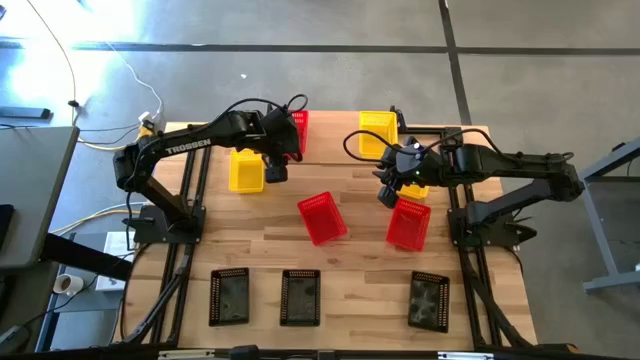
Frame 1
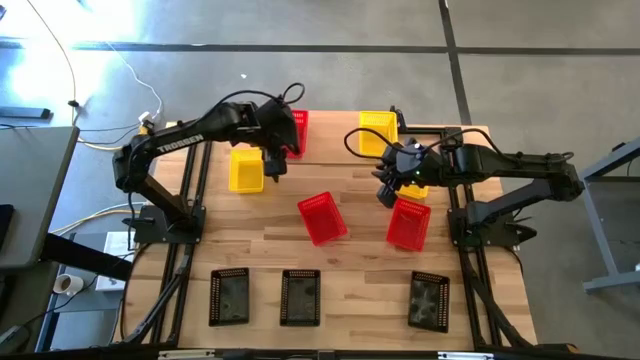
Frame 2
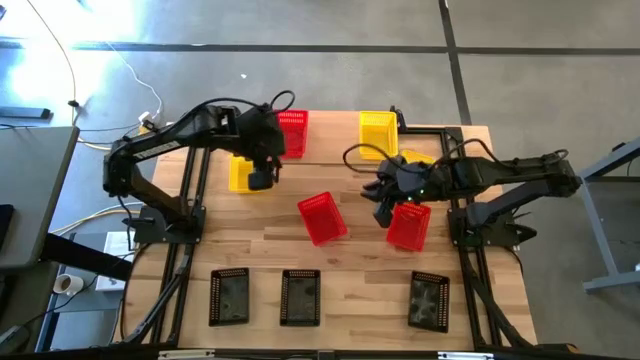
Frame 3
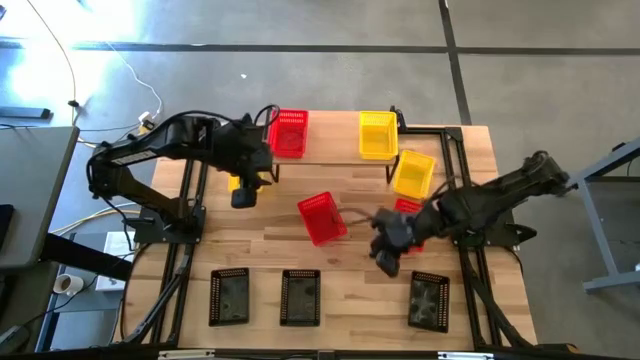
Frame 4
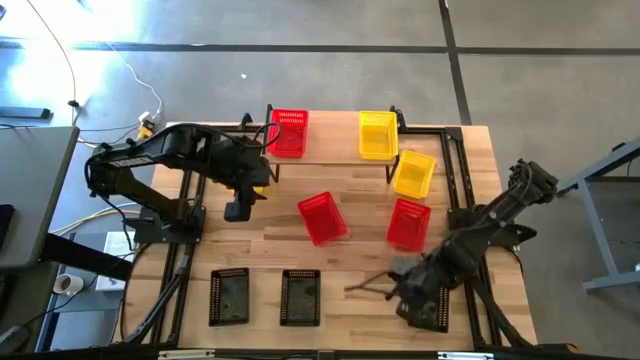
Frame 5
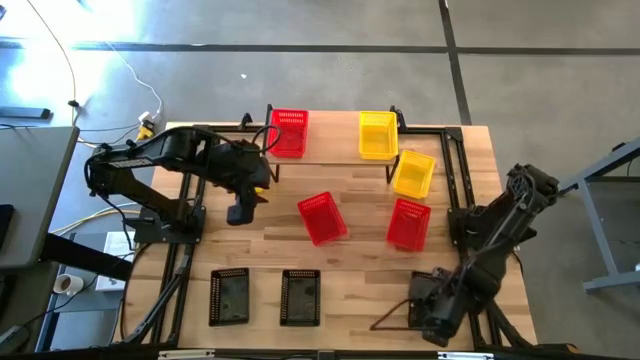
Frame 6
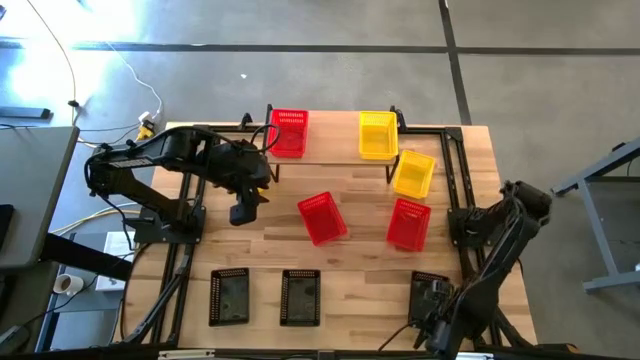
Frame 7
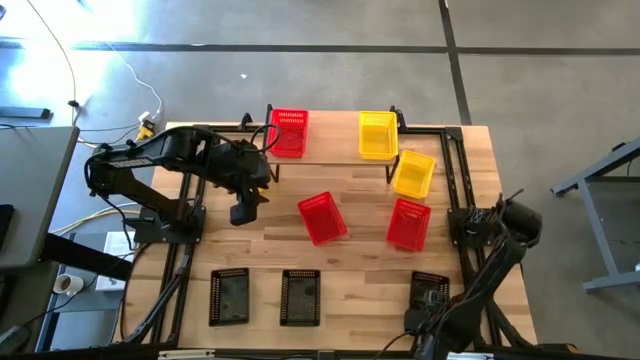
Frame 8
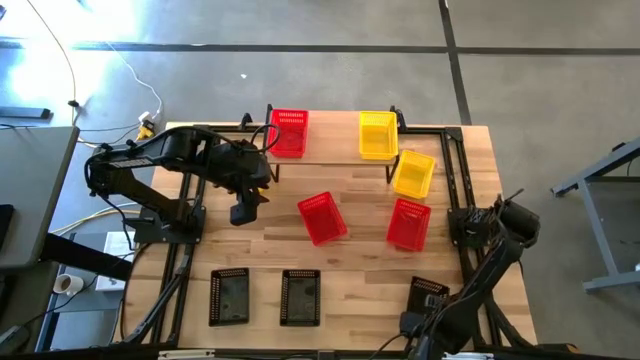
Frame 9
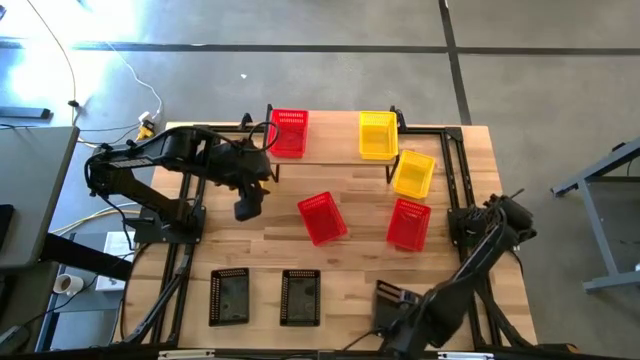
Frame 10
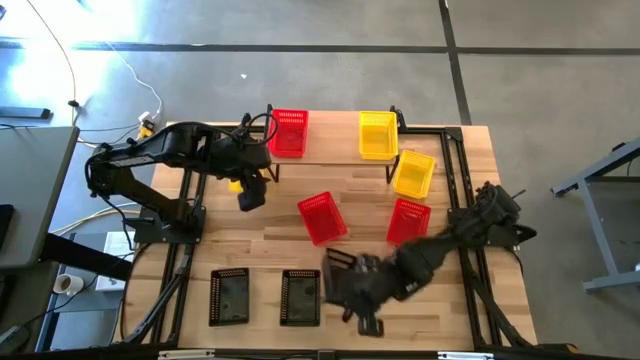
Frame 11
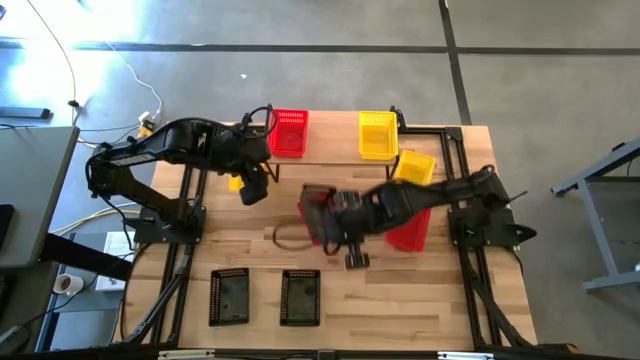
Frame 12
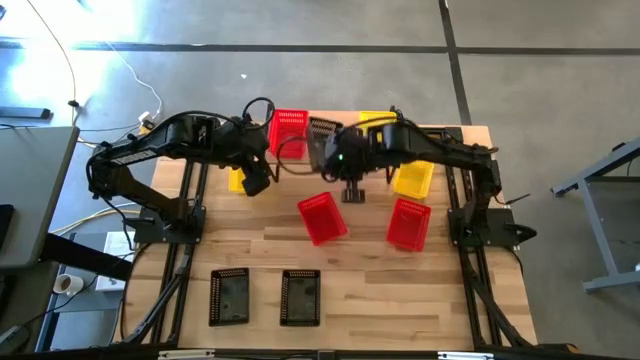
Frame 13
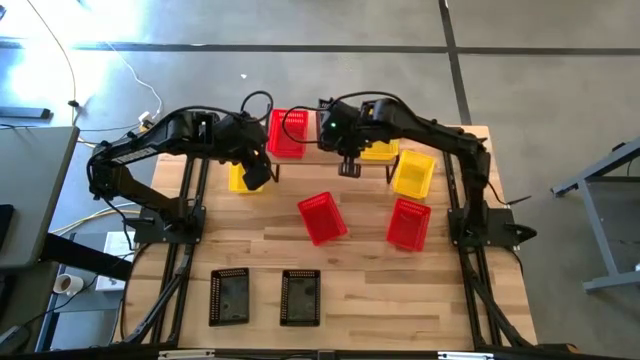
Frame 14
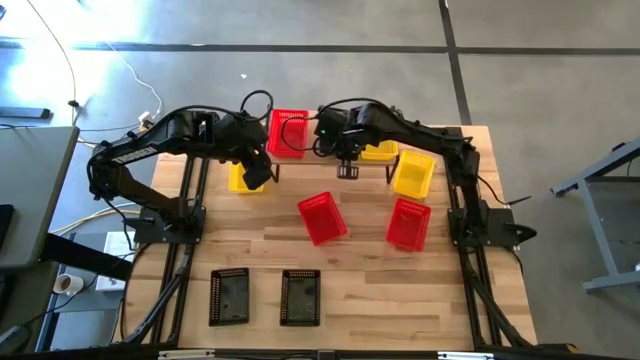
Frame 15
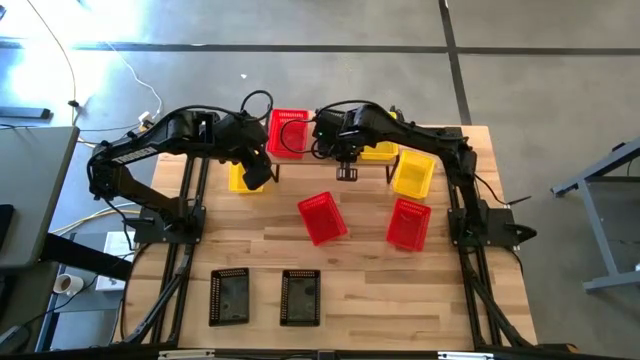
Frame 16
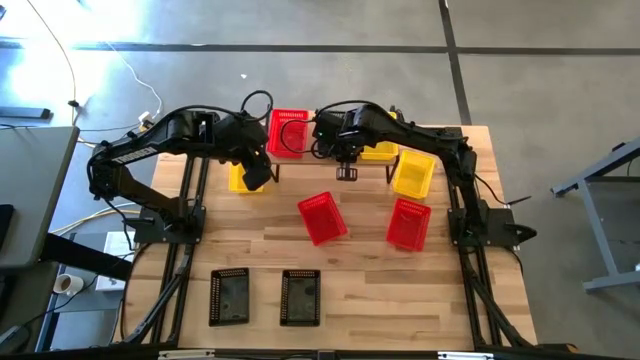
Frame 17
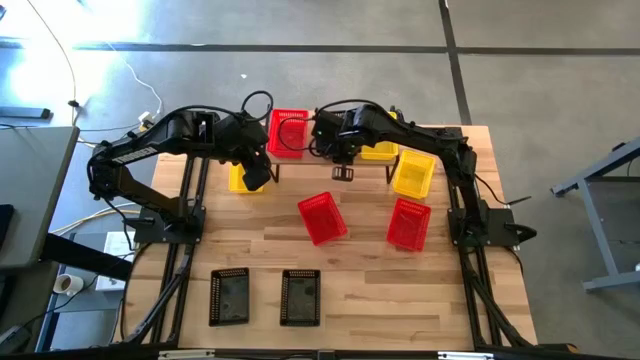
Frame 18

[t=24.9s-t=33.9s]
Task: Stack baskets on shelf by color
Put the right black bin on the shelf

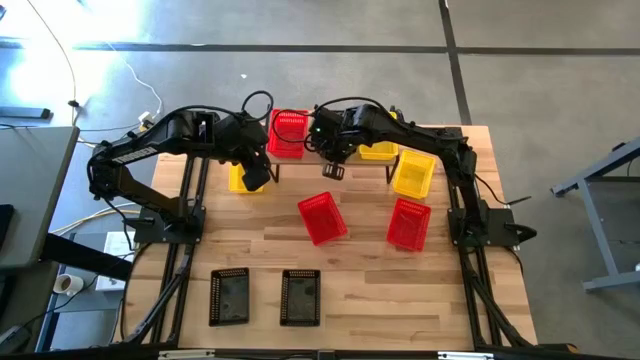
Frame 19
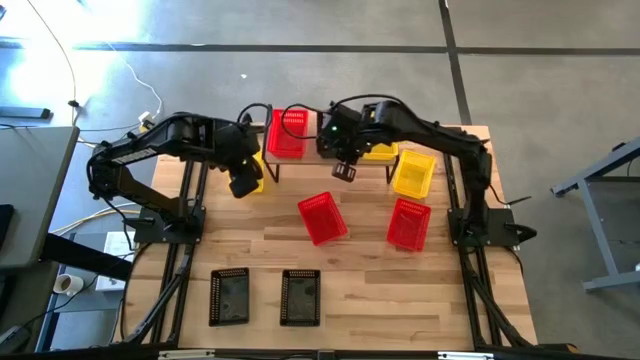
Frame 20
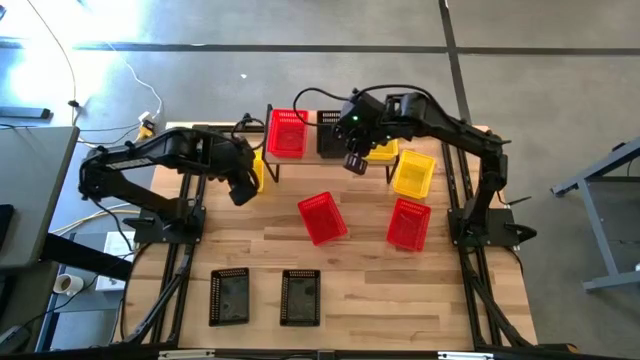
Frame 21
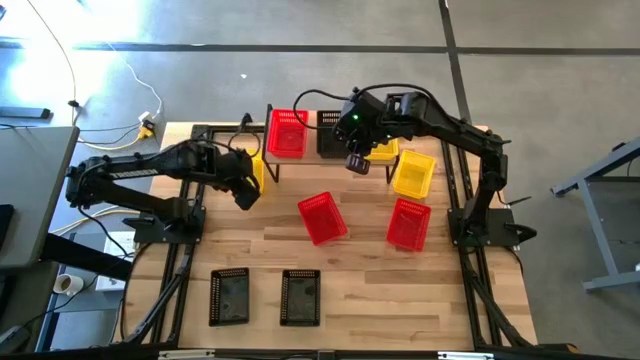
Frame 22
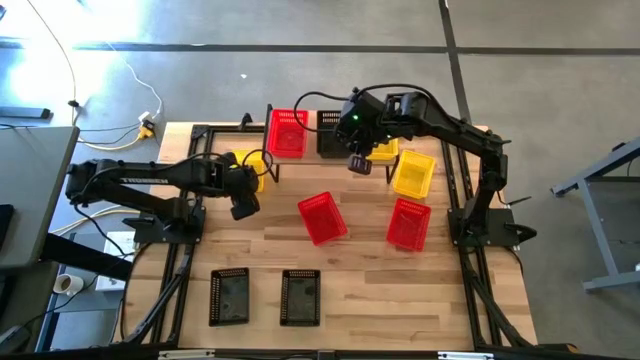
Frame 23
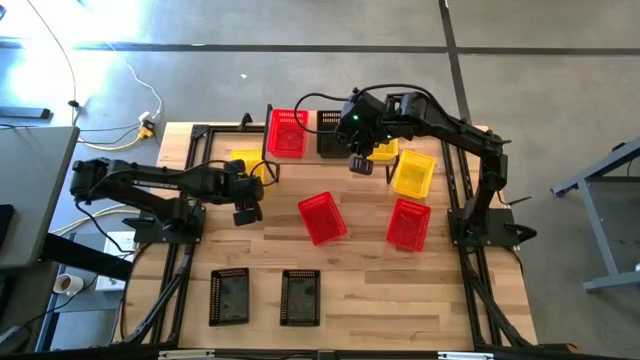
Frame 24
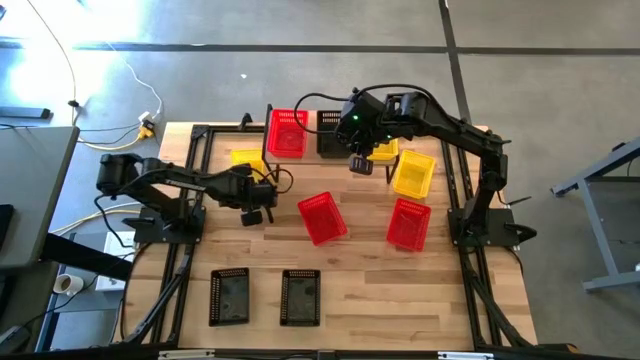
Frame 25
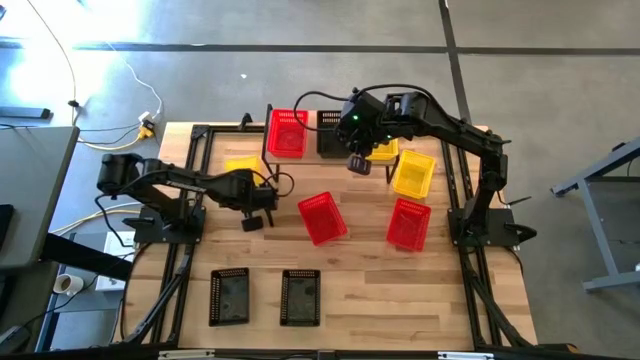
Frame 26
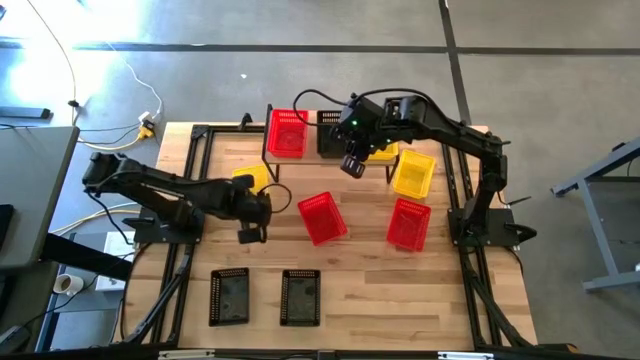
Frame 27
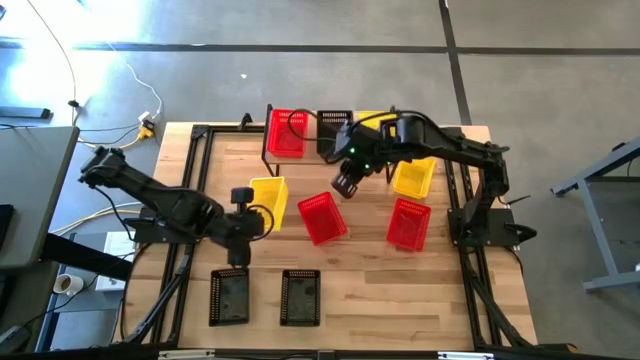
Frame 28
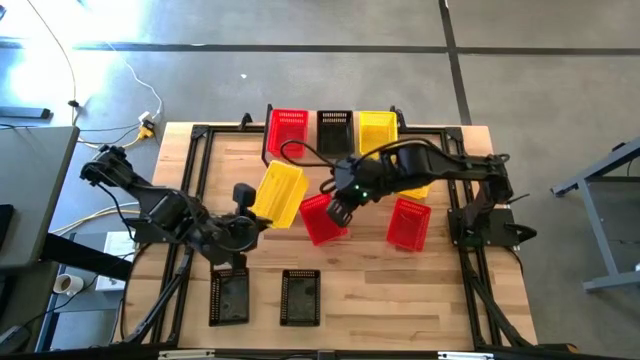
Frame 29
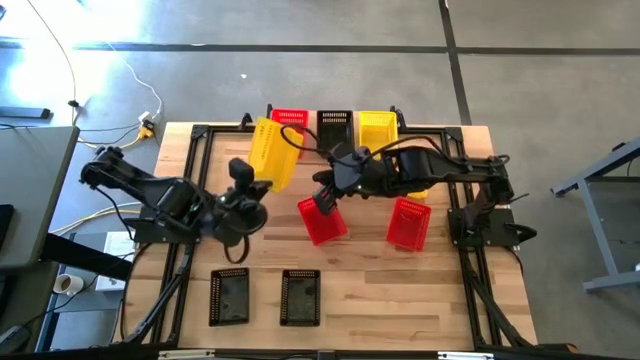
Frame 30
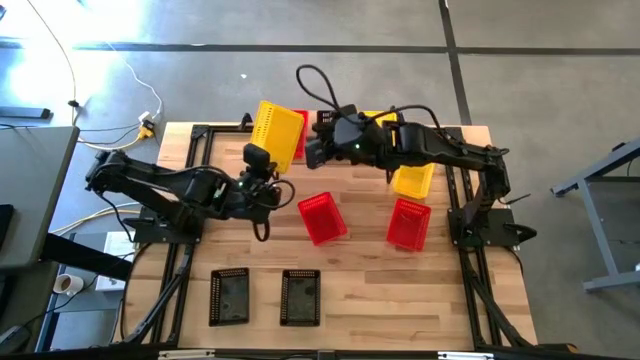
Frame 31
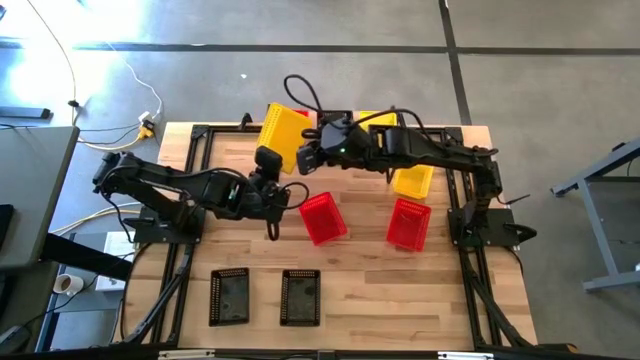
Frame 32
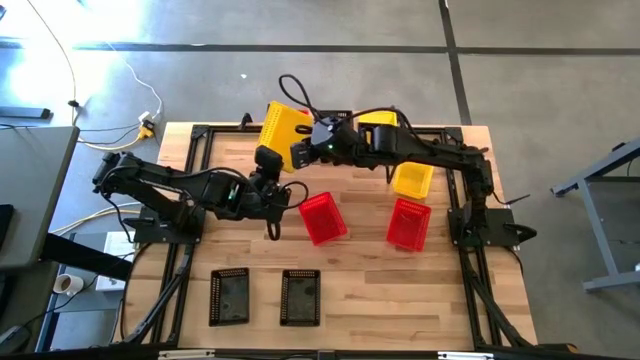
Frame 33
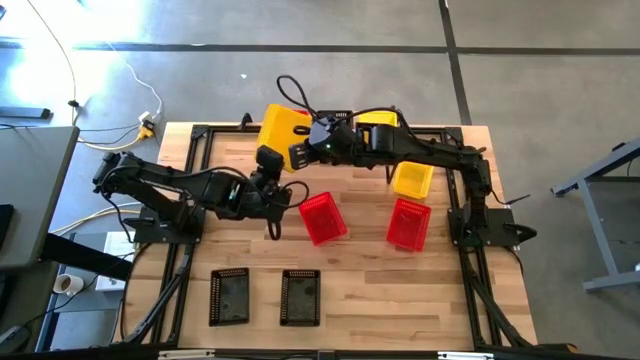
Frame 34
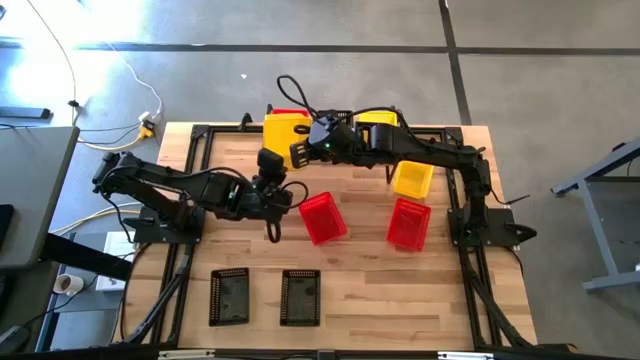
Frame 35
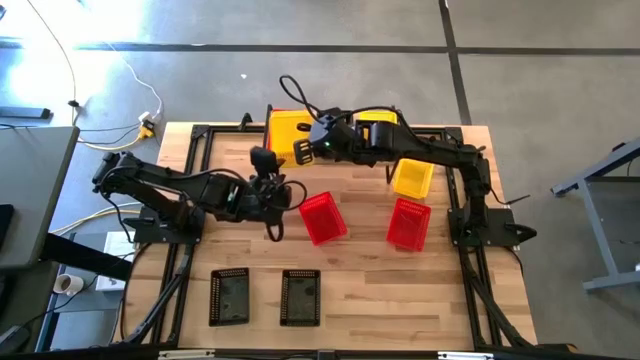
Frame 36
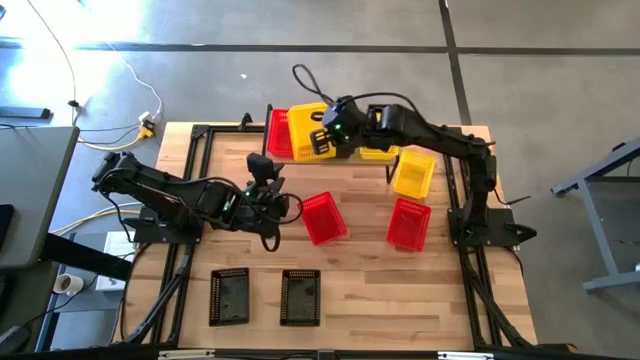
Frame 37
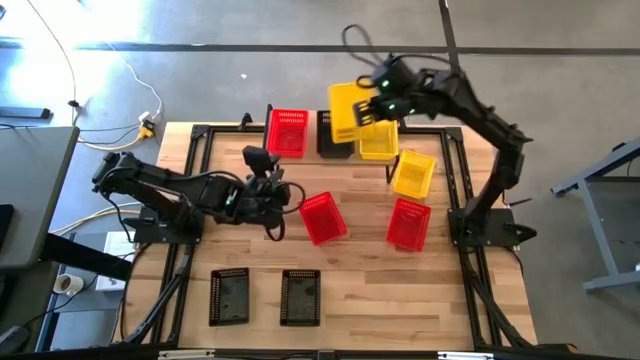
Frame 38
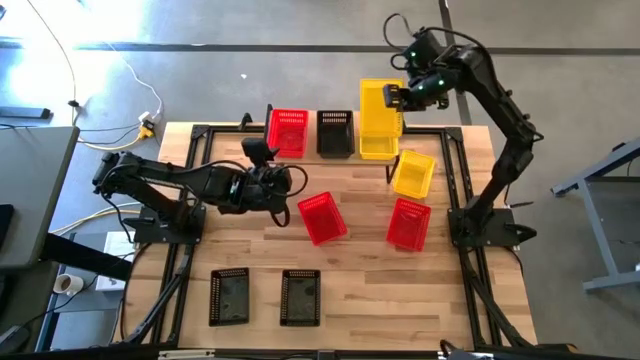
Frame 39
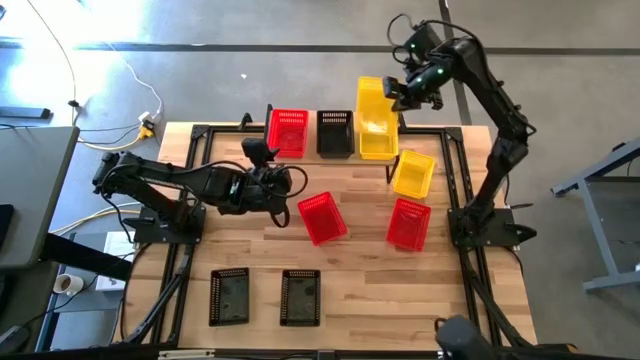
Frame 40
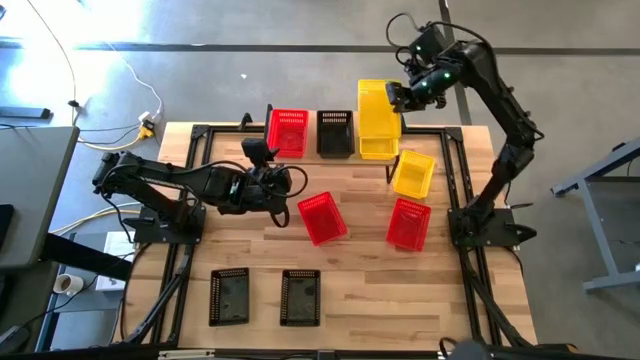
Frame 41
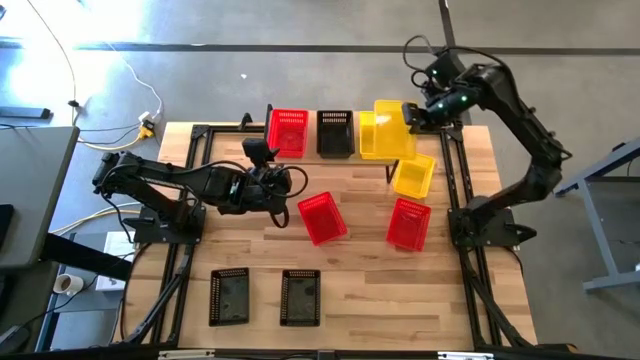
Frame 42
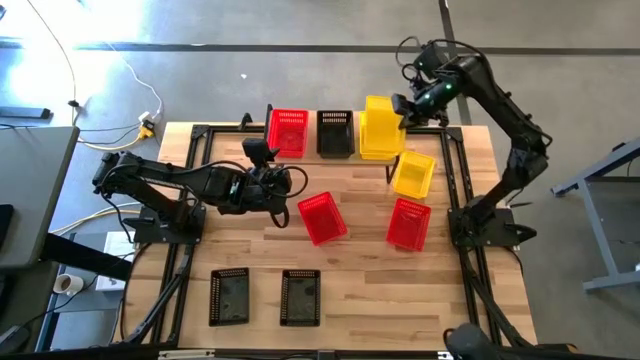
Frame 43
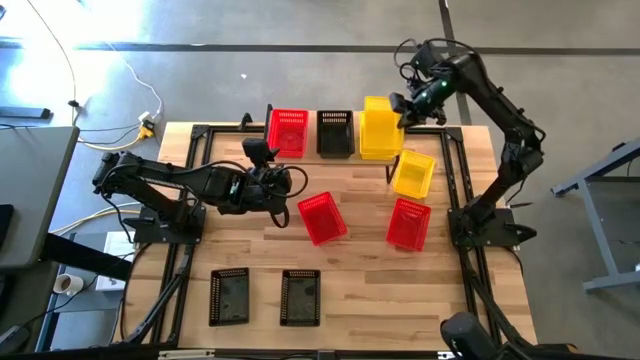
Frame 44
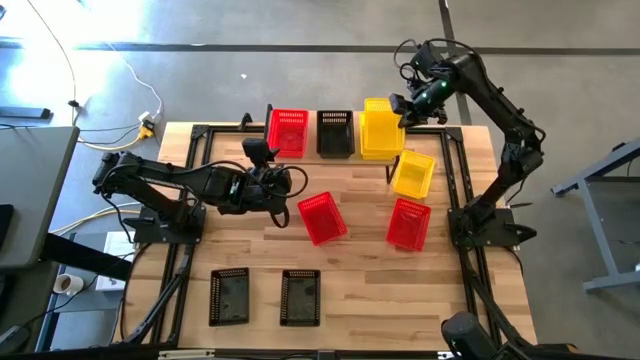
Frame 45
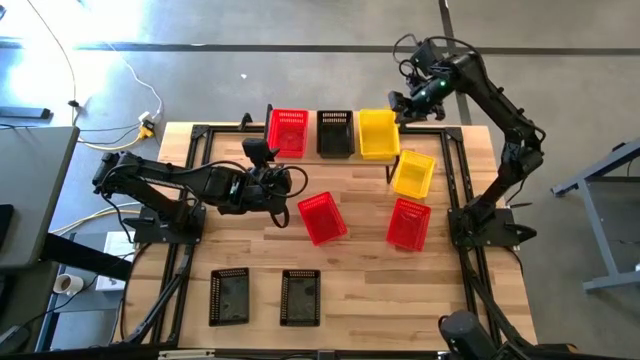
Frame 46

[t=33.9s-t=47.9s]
Stack the left yellow bin on the top of the yellow bin on the shelf
